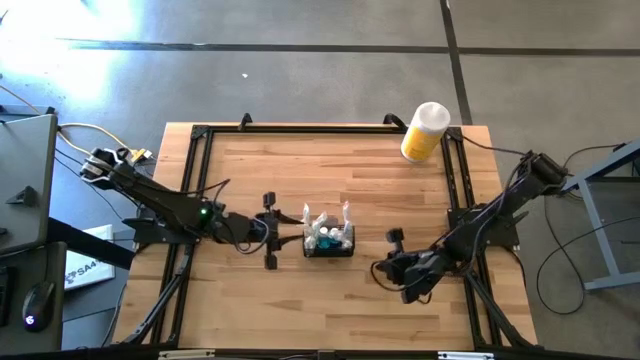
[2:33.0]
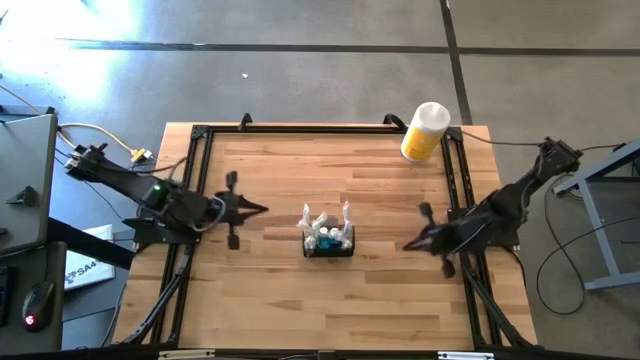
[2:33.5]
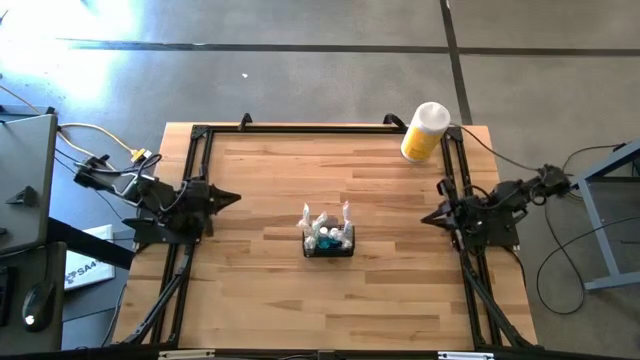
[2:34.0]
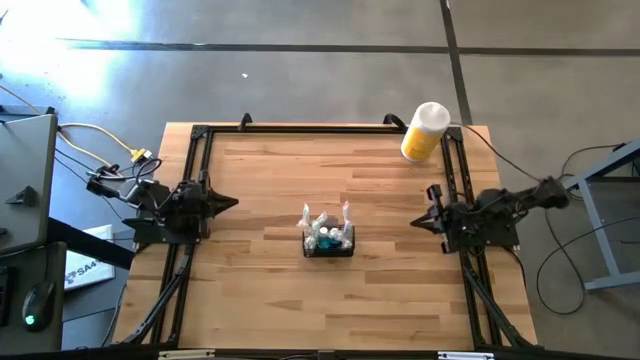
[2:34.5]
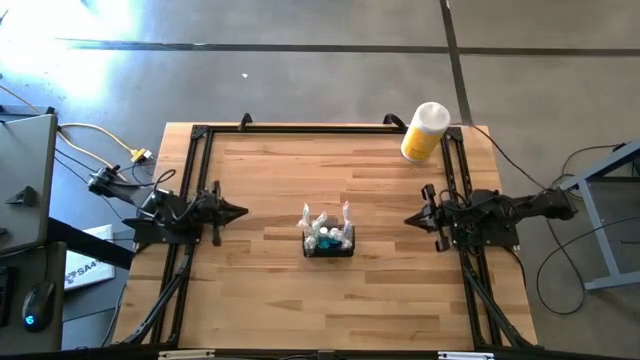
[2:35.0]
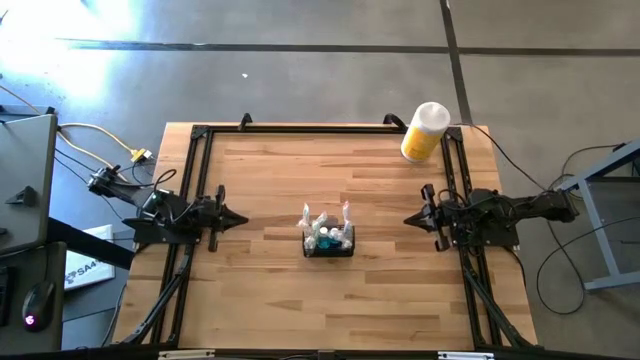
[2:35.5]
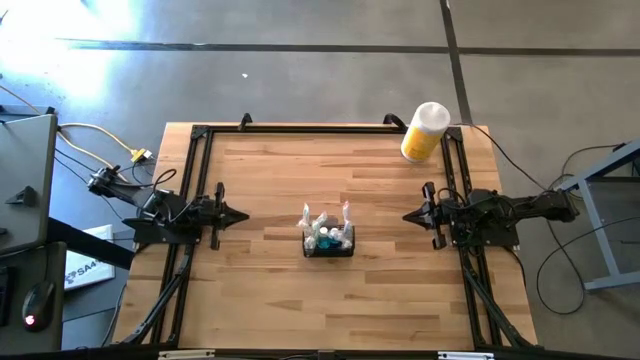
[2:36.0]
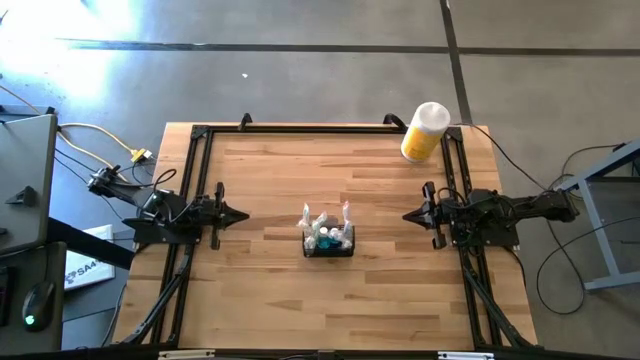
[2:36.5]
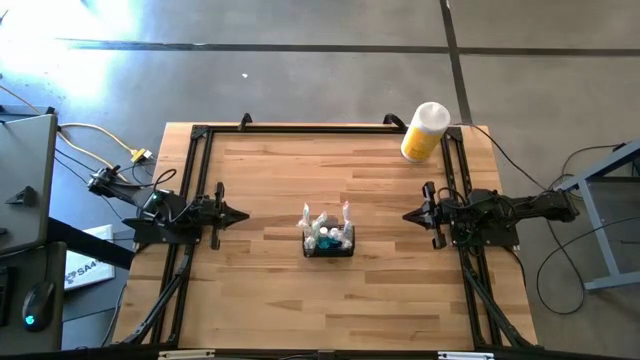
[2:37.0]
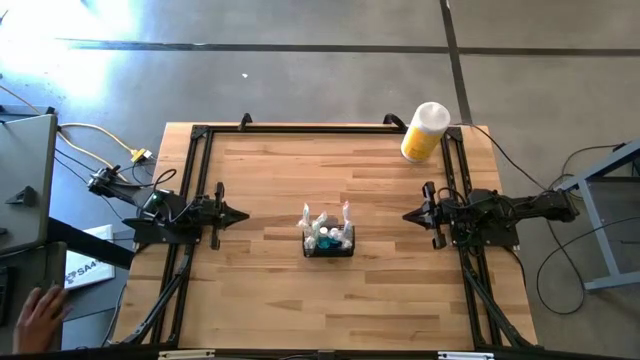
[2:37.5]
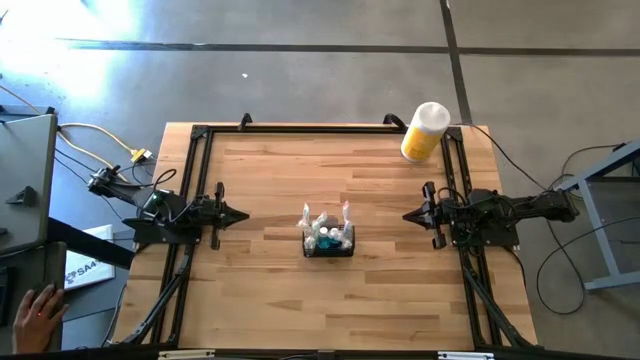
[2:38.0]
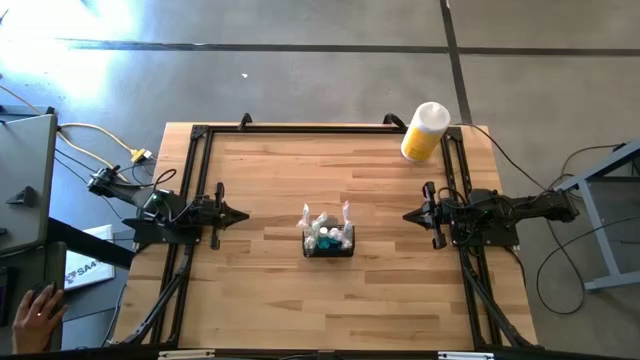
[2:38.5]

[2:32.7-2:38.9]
Task: Pick & Place toothbrushing station
Return to Home Position

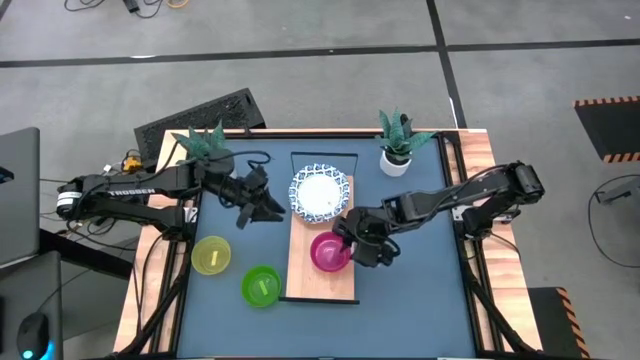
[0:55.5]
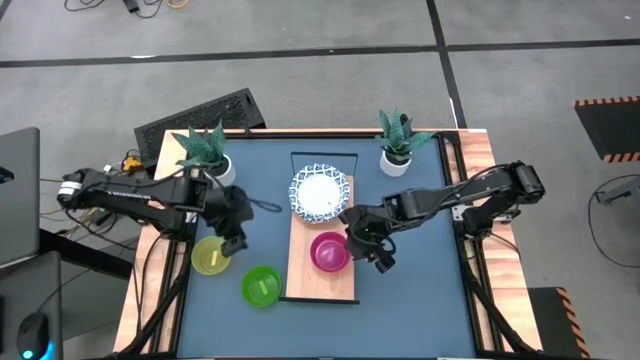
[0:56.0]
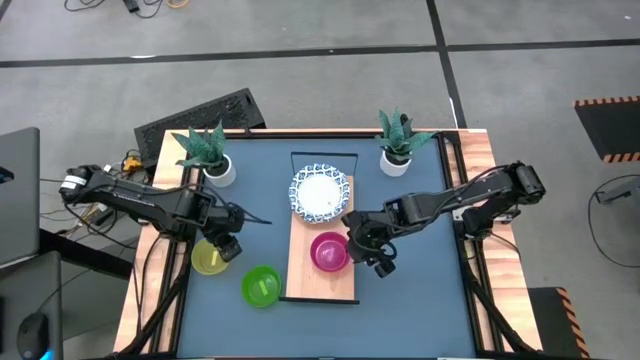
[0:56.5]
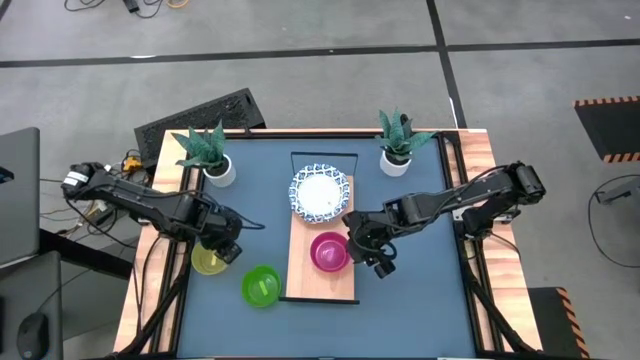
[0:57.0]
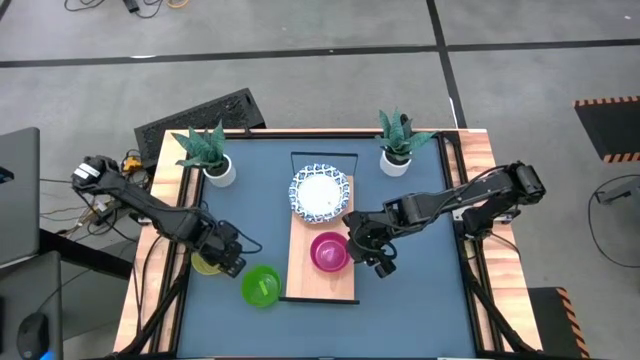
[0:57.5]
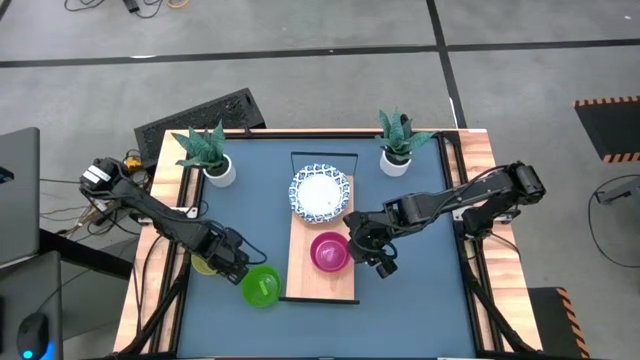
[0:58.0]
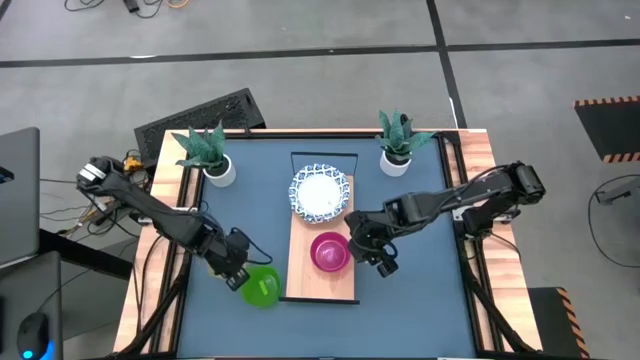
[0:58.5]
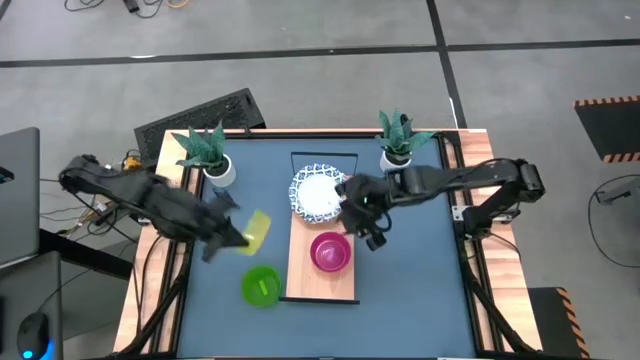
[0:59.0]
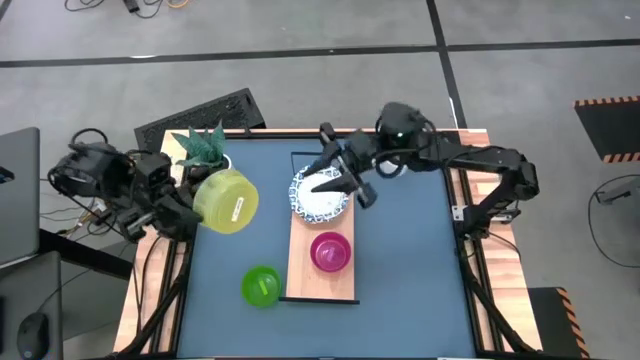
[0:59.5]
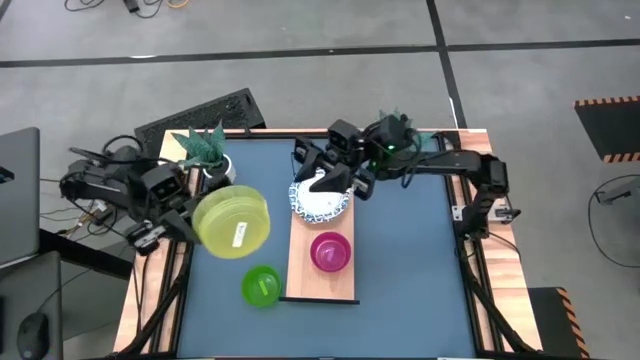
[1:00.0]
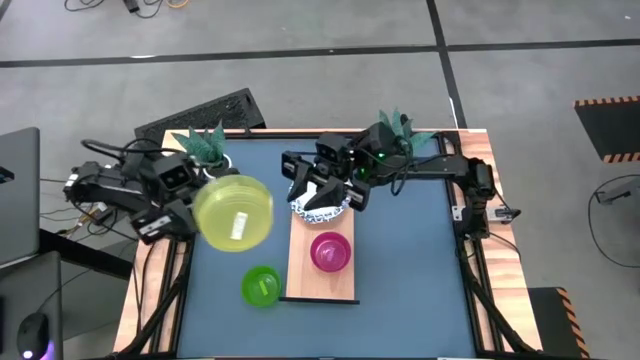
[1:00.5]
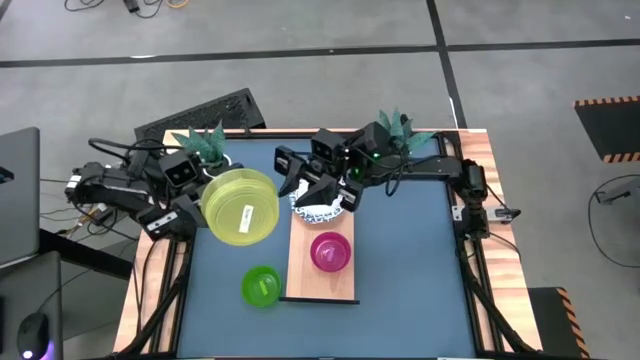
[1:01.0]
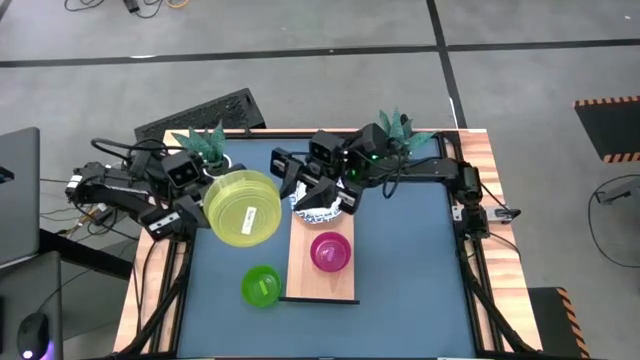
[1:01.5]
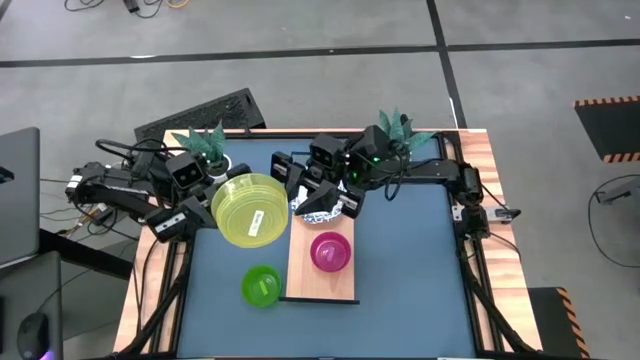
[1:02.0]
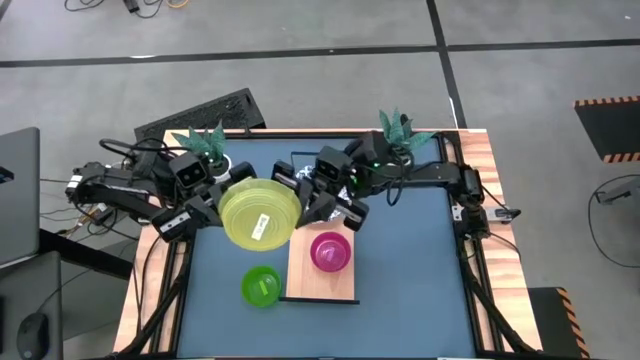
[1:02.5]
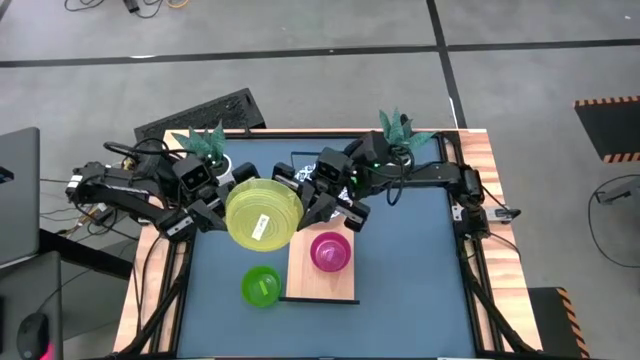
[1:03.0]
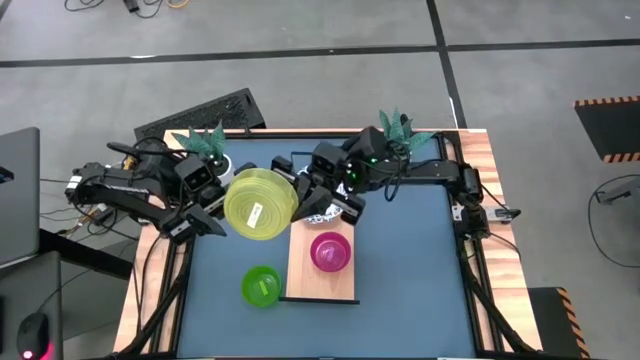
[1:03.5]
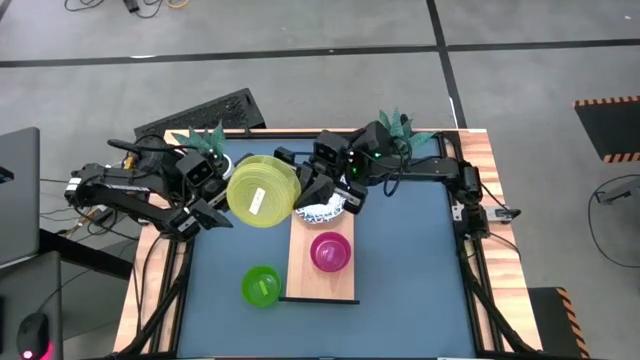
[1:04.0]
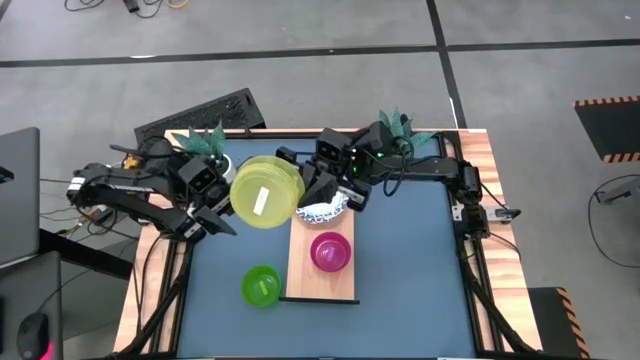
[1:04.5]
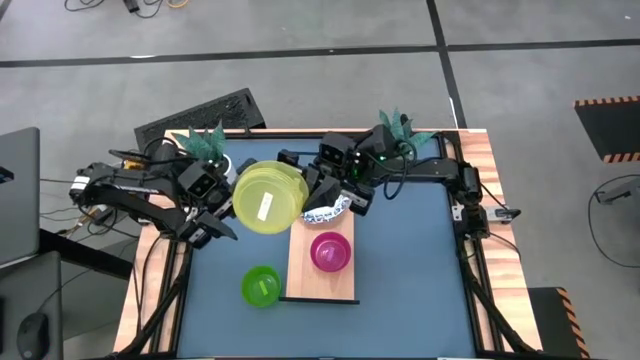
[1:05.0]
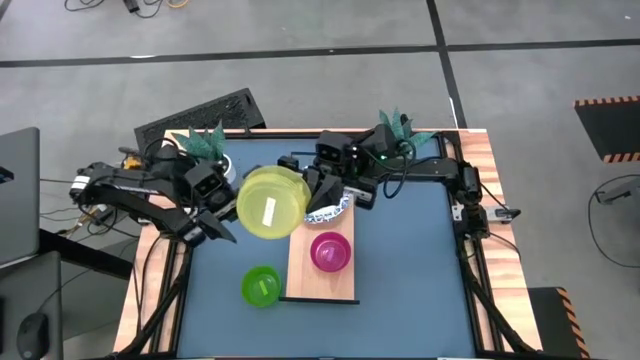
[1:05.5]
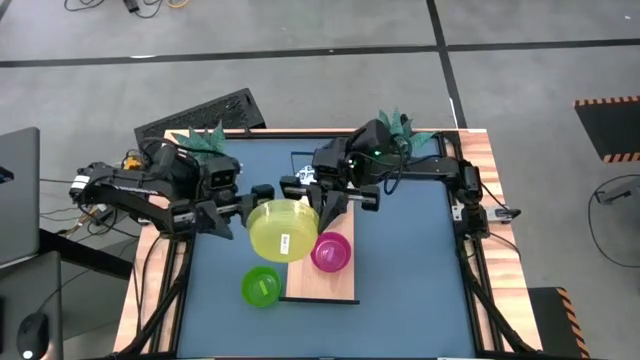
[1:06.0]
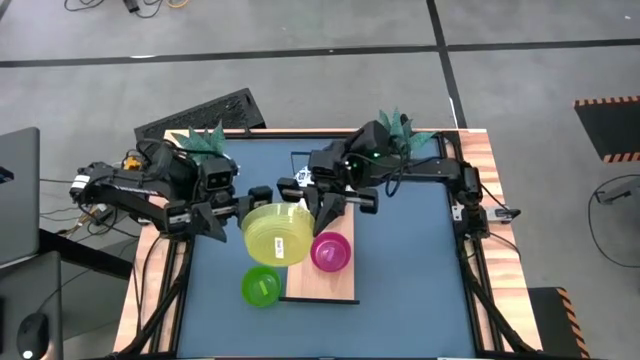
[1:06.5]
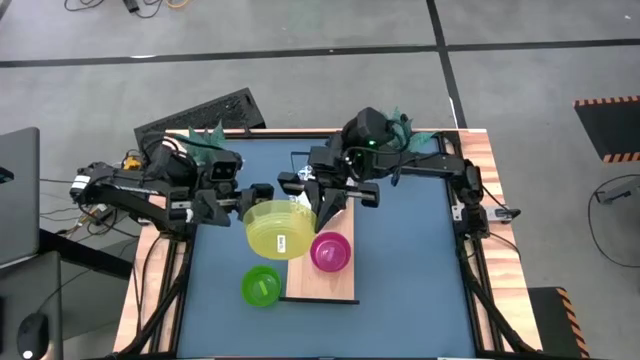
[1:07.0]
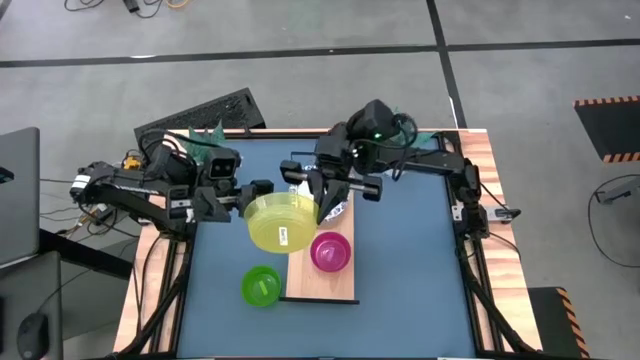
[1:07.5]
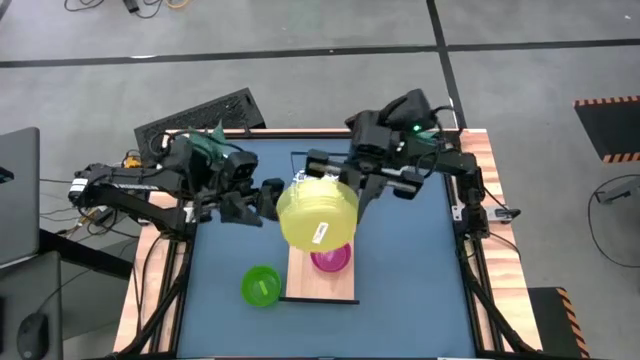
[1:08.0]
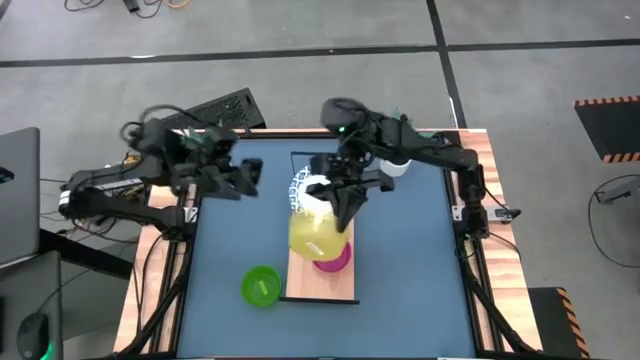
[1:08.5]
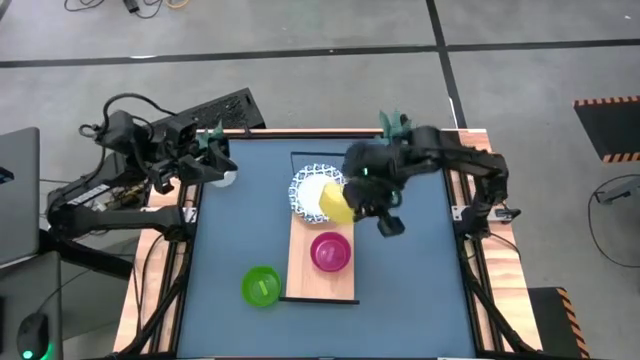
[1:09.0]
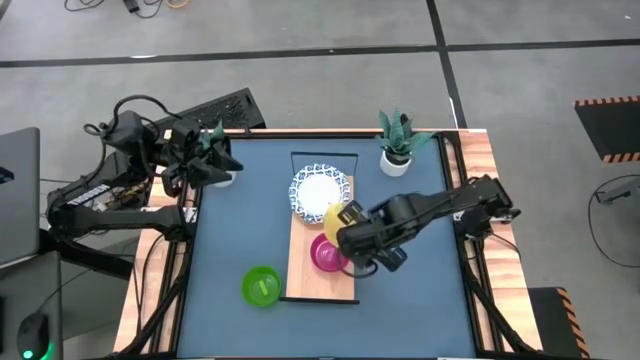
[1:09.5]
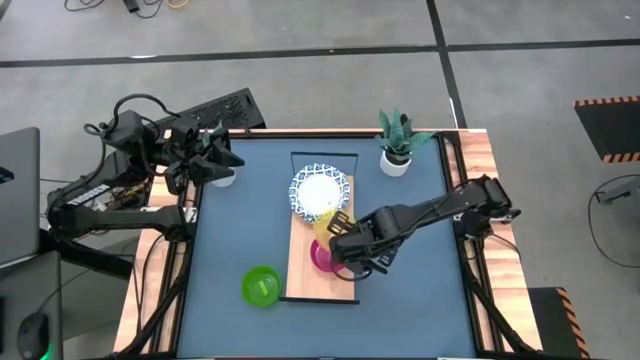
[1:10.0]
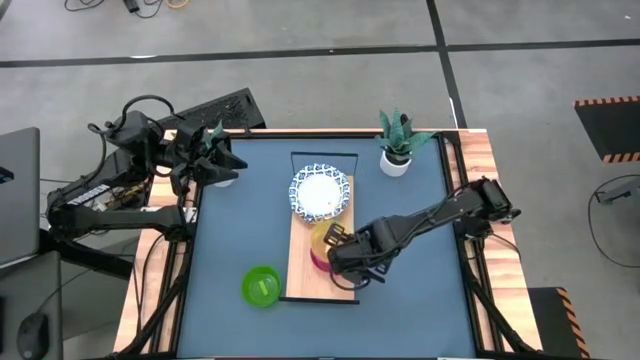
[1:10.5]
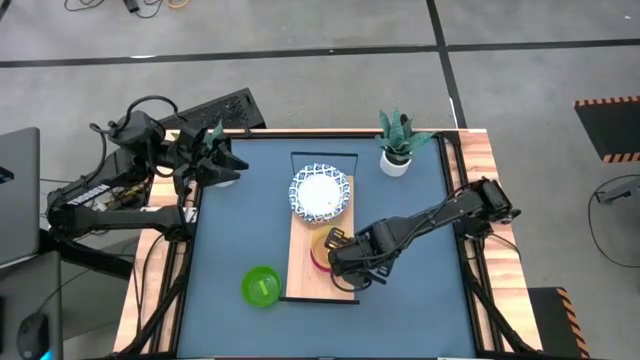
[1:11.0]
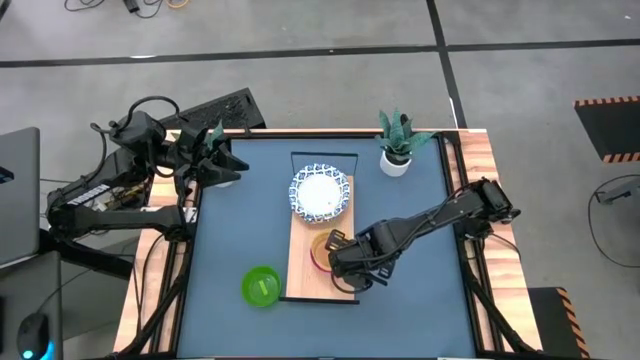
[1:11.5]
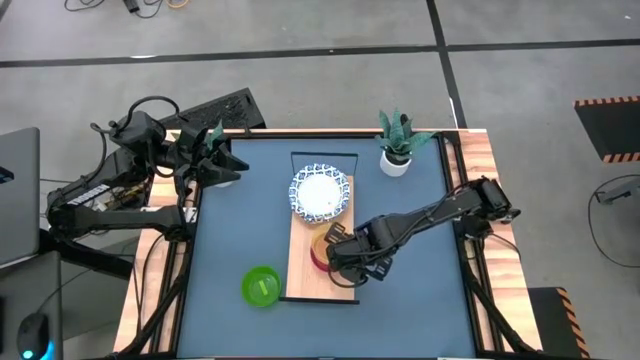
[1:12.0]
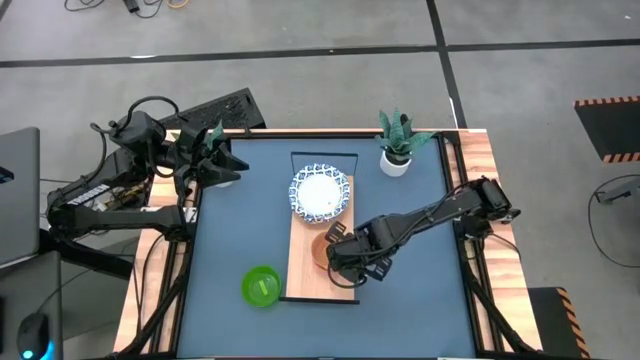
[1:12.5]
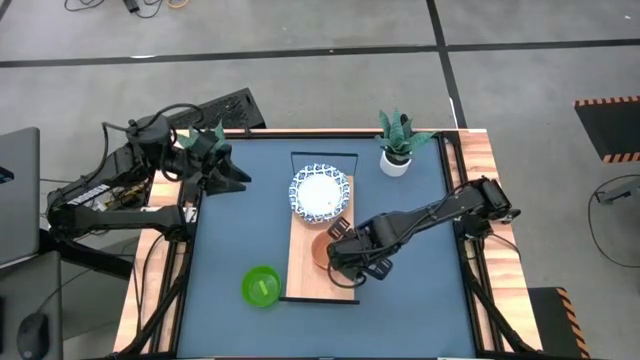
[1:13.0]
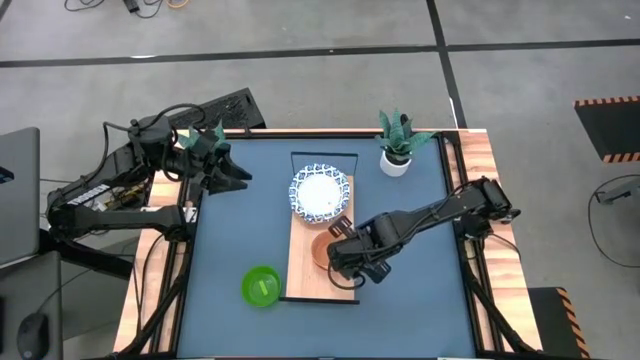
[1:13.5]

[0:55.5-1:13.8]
Task: Place and stack bowls onto a shelf
Stack the yellow bowl on top of the purple bowl on the shelf
